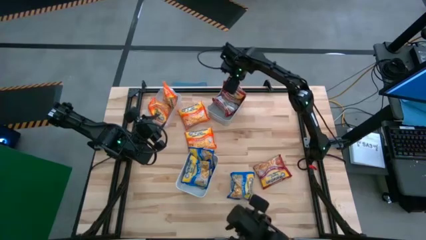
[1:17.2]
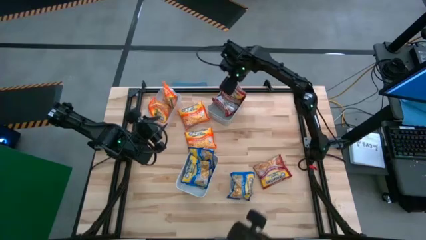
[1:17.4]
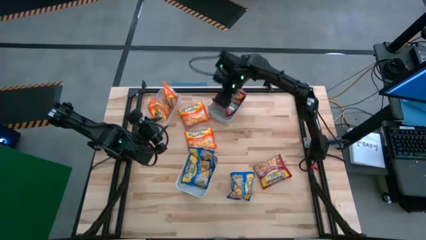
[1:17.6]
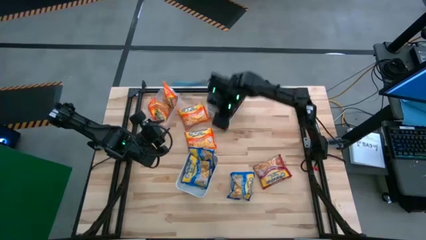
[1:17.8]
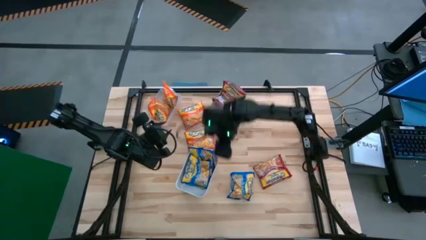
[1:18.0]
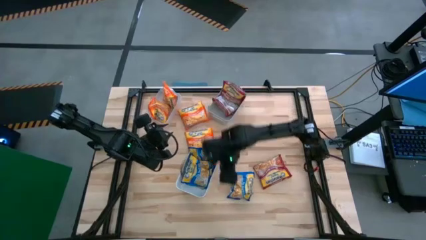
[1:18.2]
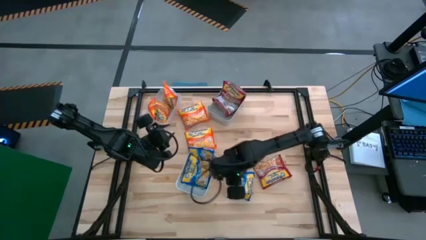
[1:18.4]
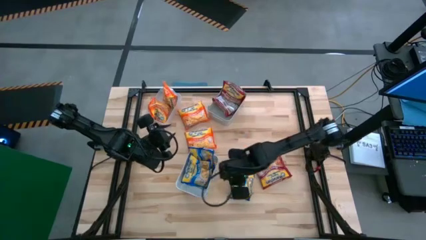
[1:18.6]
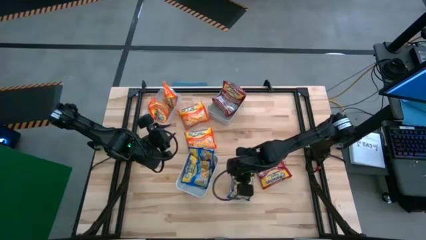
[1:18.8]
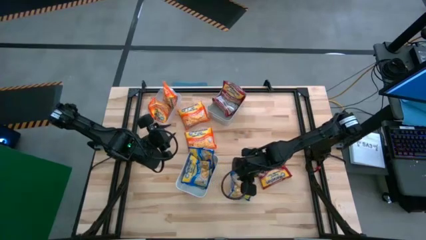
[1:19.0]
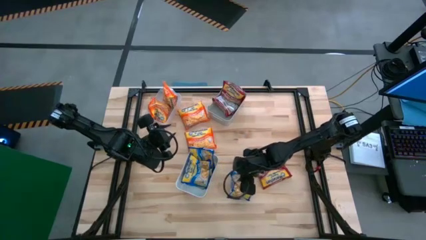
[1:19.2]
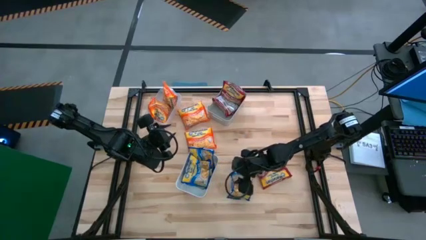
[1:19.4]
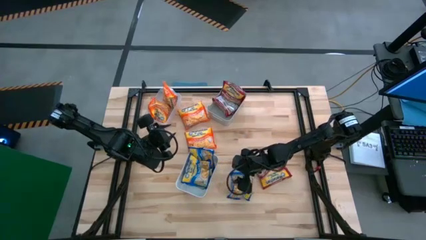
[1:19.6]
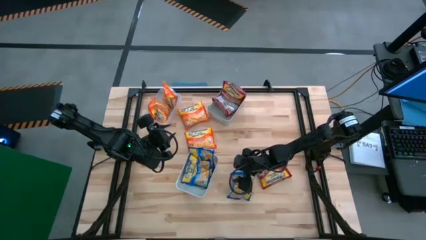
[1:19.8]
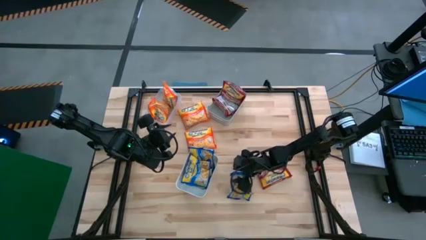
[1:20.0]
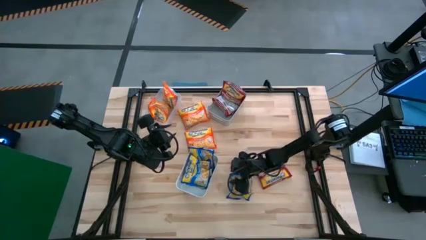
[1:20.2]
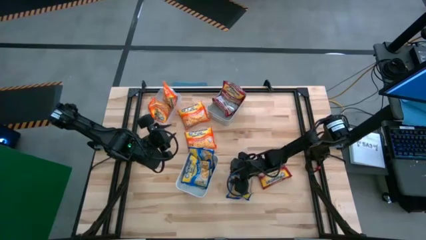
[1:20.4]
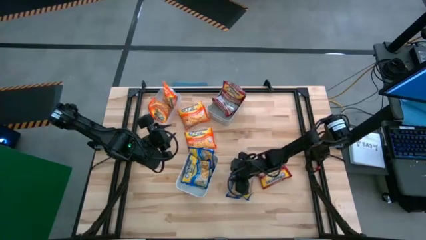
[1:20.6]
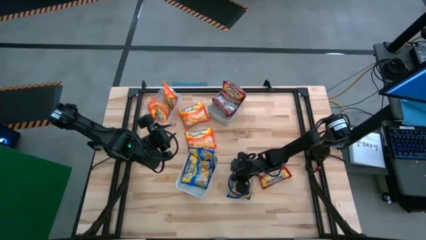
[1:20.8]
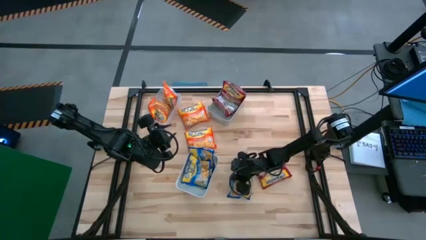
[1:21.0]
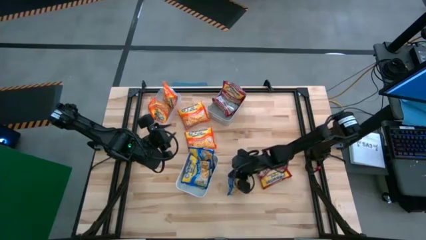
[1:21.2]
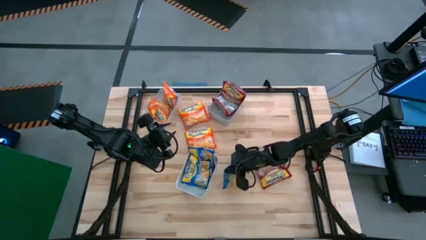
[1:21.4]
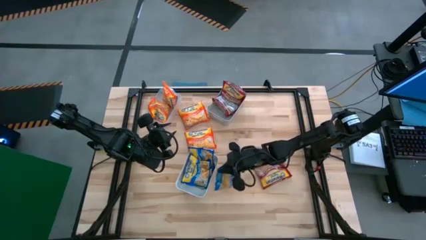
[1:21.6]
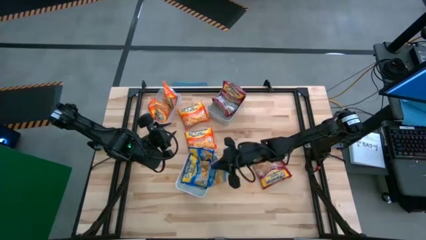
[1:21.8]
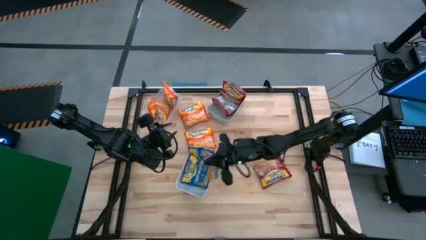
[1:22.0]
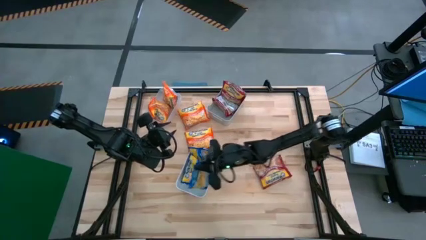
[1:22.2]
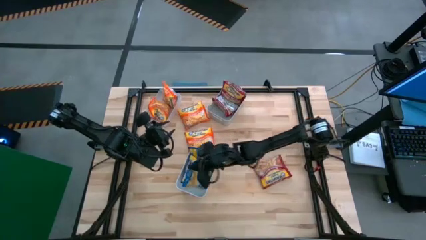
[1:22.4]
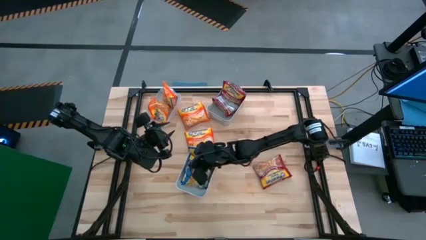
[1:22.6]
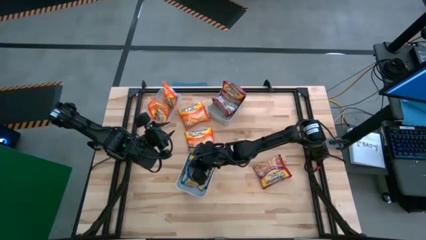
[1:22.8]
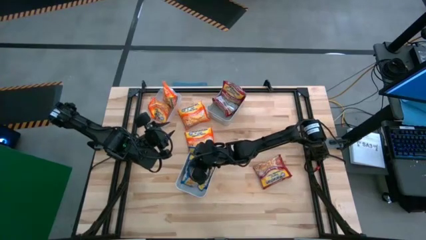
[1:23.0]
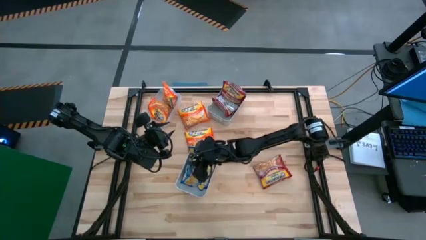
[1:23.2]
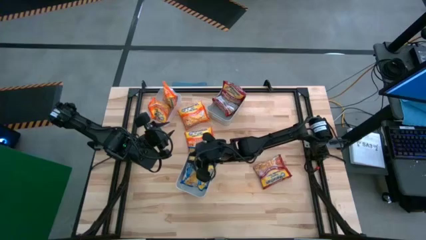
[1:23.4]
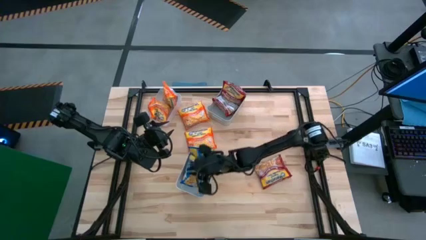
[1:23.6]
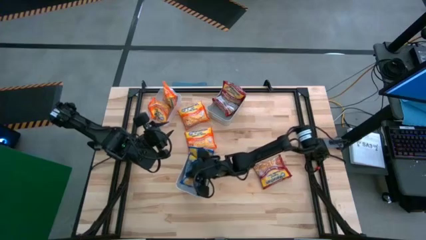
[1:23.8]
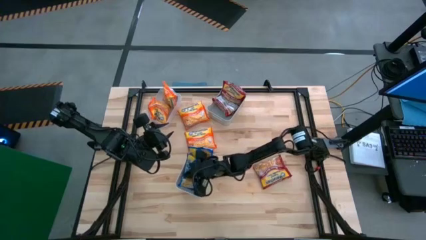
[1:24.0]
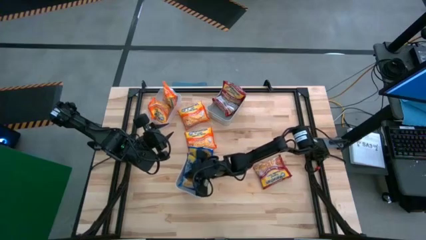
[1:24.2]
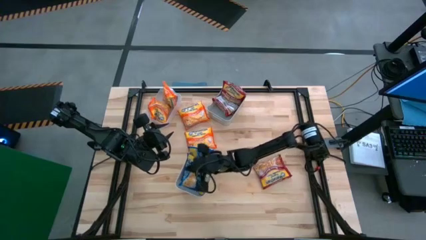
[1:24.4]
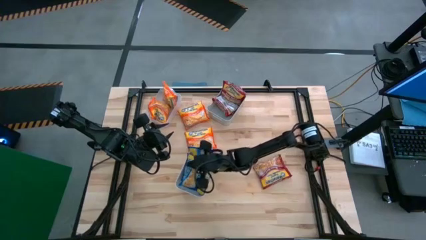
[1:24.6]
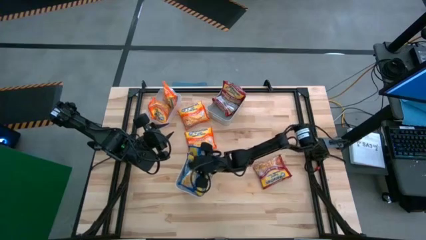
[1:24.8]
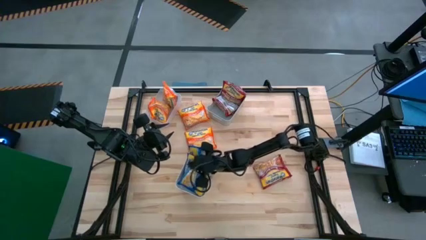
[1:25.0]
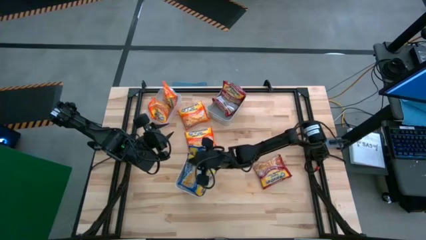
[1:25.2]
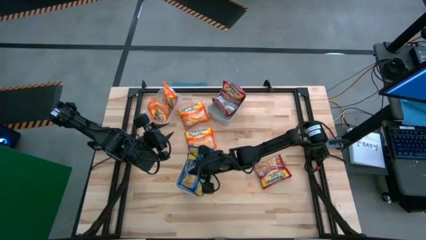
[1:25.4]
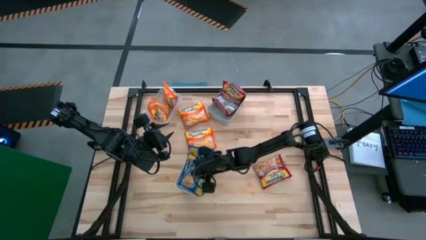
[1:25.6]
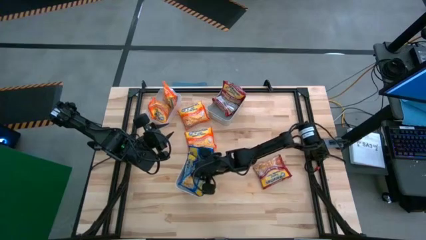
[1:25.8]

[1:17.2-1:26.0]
Task: Sort Maruchan noodles
Put the blue noodle pack into the white bin

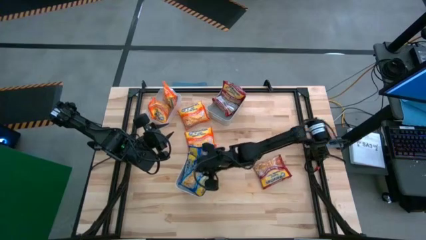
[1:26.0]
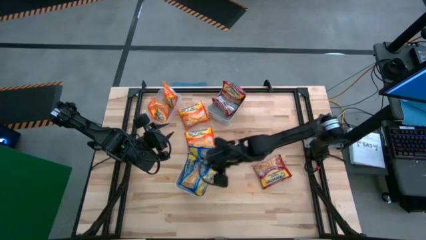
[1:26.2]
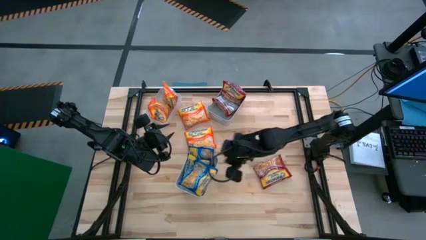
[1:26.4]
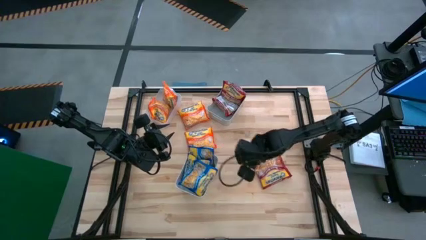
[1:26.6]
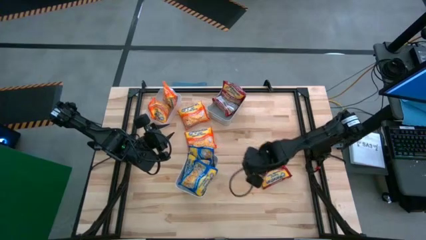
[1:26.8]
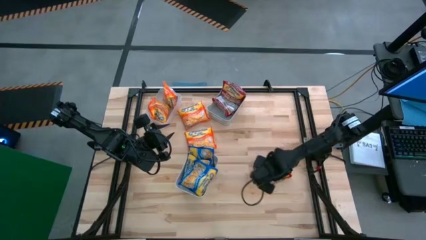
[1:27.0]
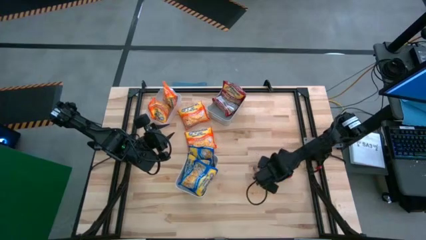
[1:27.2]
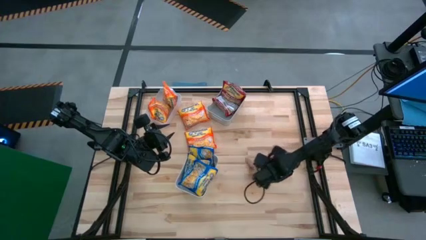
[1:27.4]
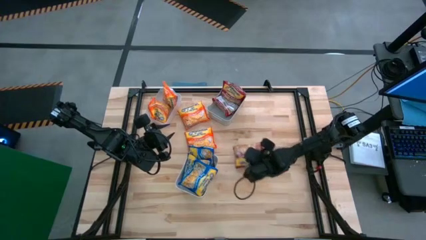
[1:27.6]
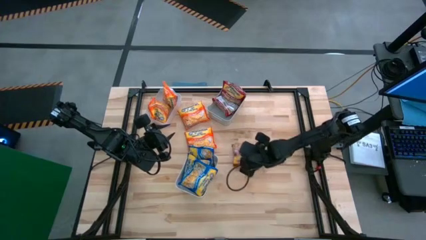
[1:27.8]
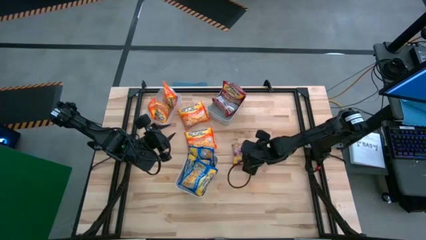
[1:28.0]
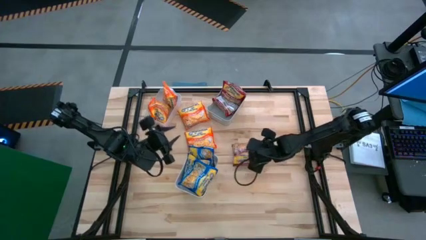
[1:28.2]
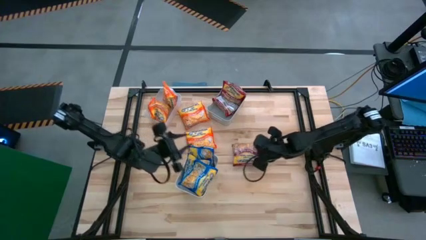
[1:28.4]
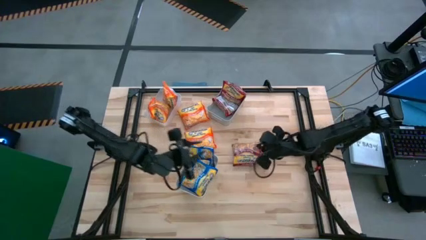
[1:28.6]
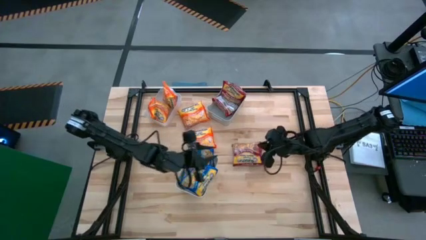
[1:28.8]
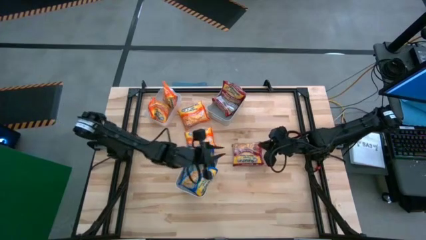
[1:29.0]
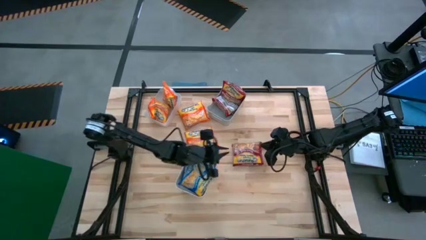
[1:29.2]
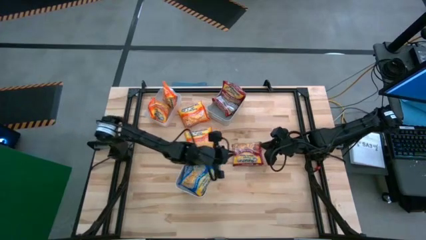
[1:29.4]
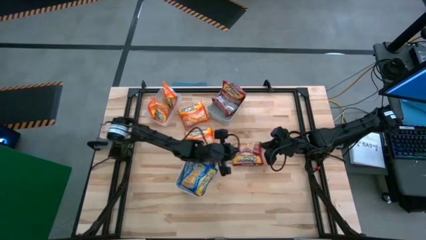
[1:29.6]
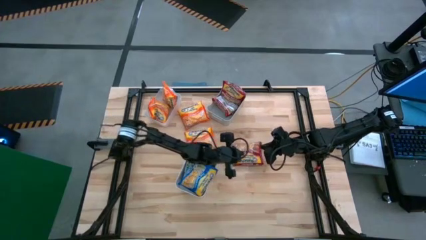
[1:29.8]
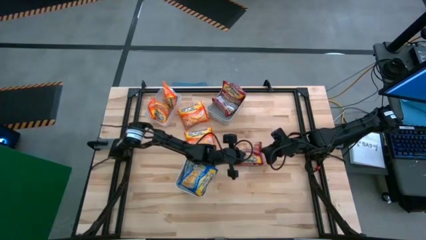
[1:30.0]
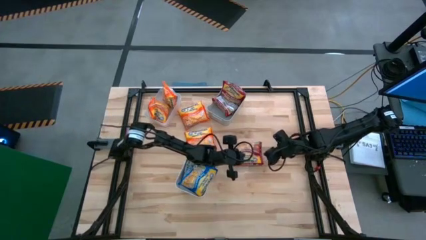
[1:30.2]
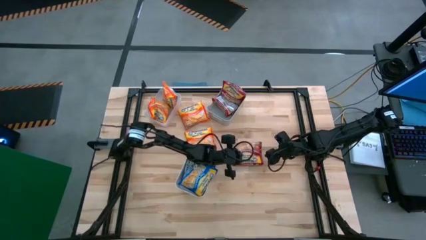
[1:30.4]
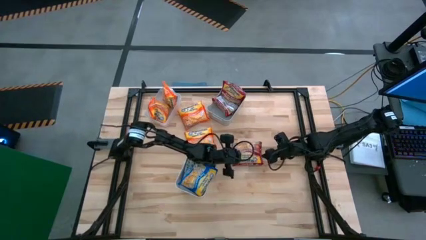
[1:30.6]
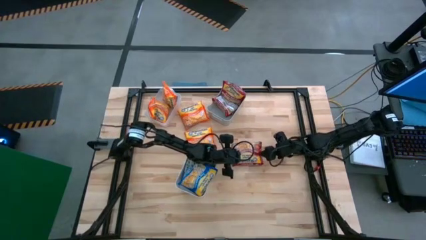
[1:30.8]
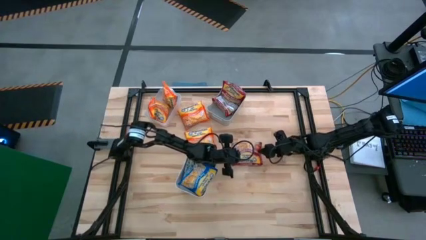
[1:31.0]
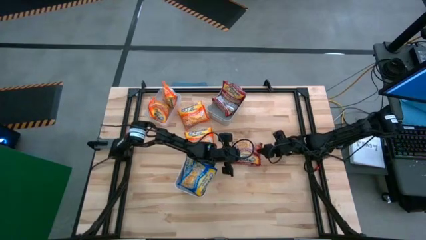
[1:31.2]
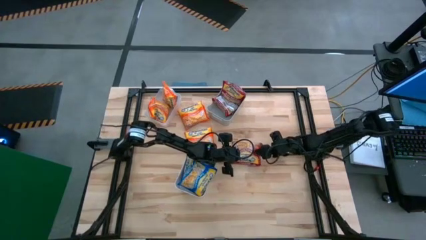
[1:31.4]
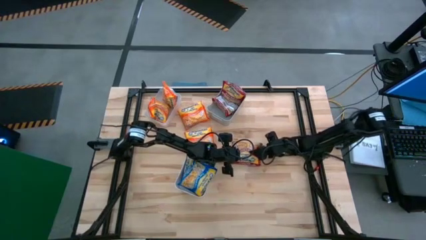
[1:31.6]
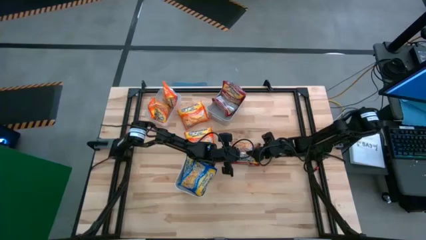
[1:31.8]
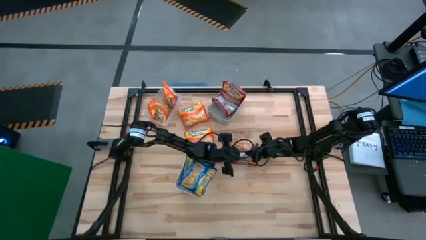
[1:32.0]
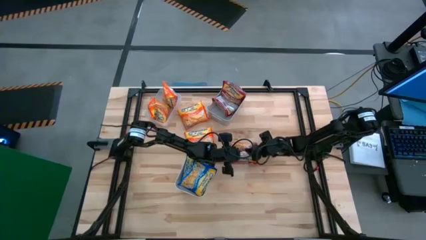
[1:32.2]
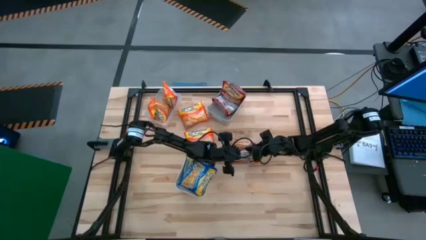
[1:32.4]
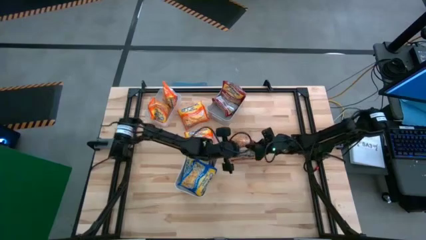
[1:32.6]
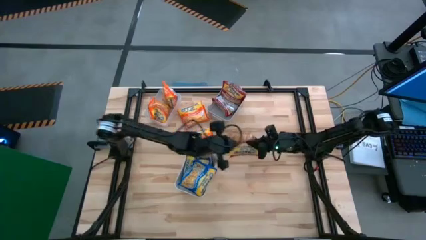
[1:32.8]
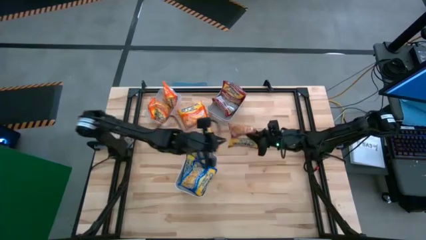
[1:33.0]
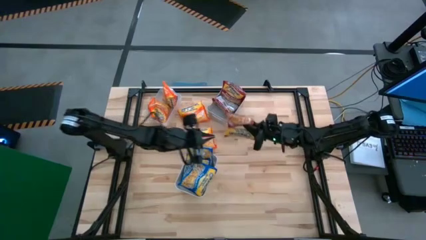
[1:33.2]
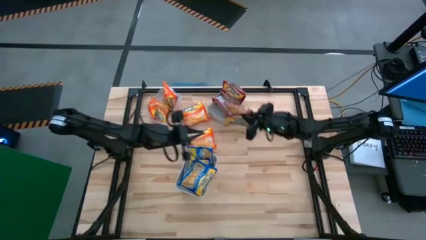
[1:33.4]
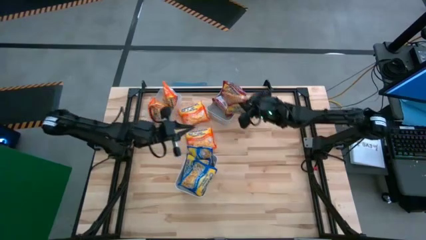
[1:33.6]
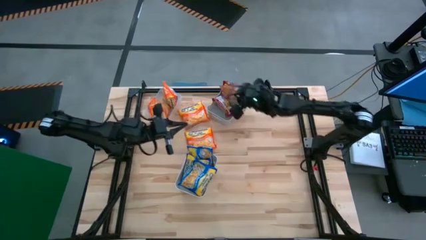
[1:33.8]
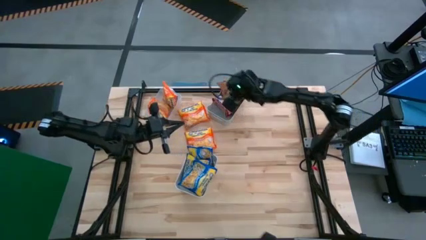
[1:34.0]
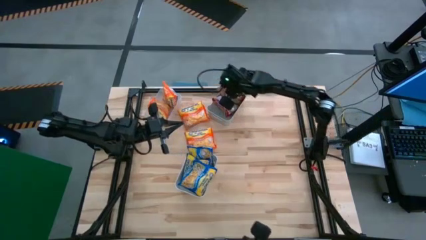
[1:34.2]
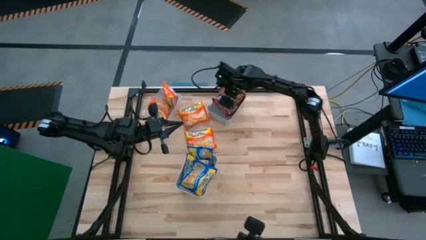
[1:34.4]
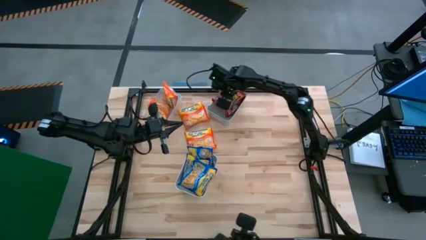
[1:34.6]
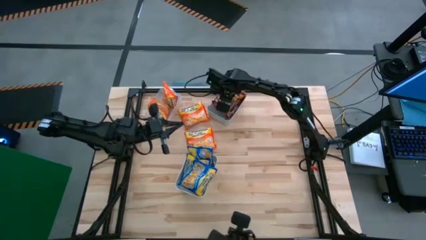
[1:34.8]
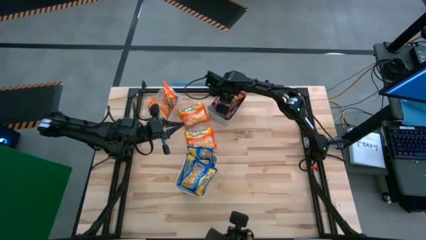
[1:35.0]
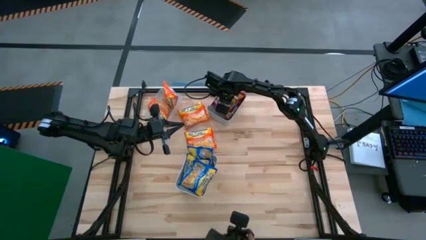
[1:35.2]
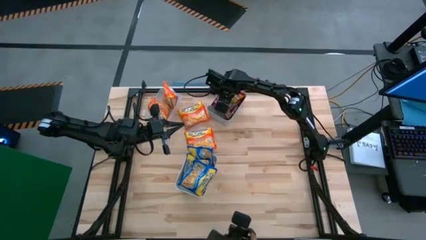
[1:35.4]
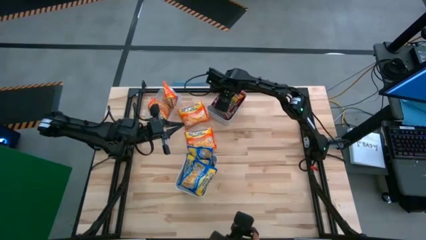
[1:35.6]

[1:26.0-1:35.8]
Put the red noodle pack into the gray bin
